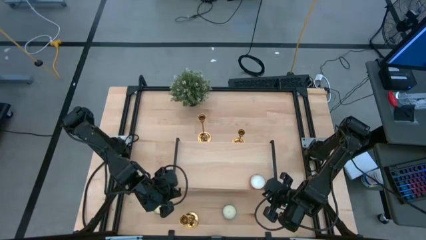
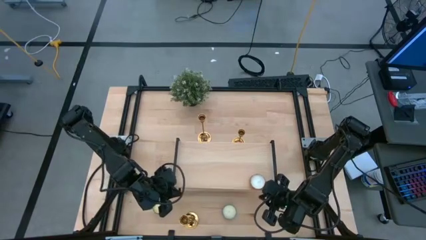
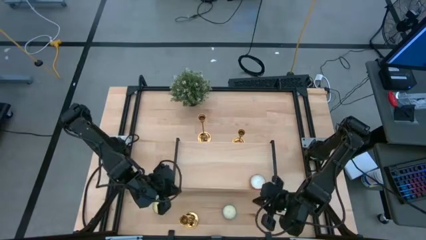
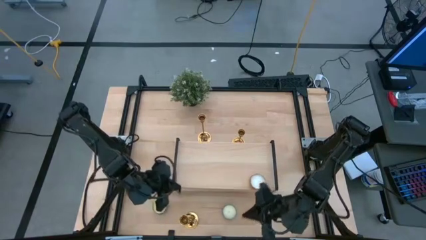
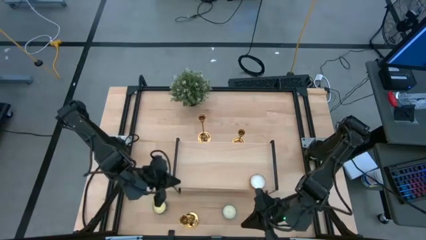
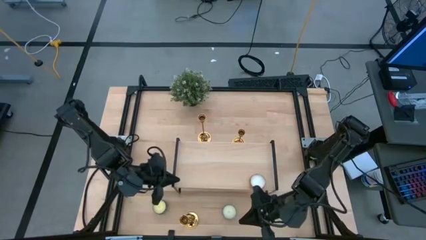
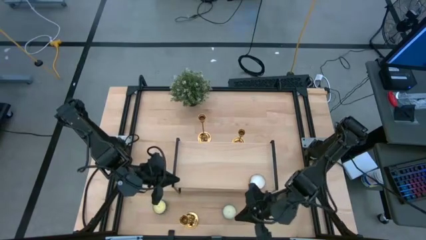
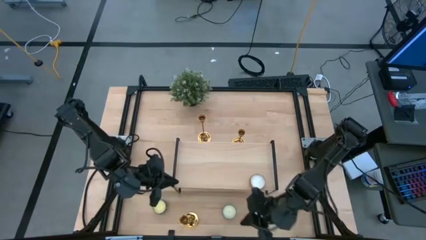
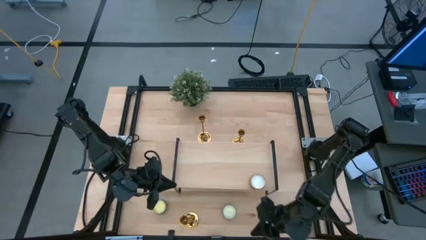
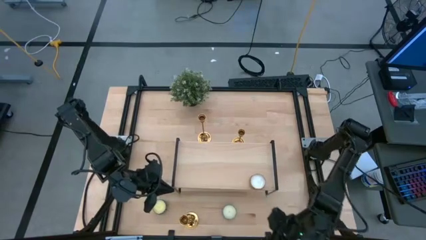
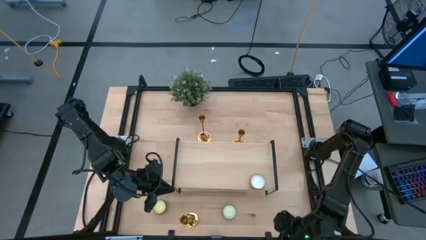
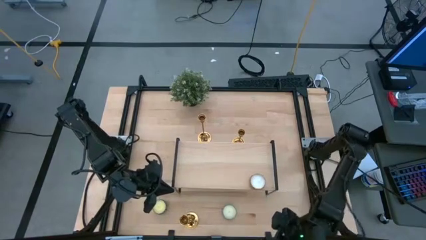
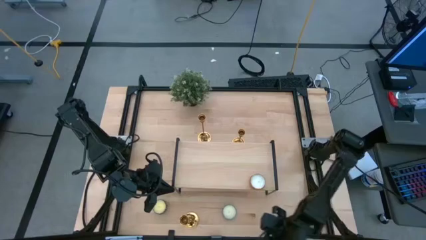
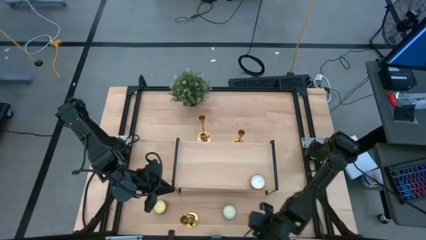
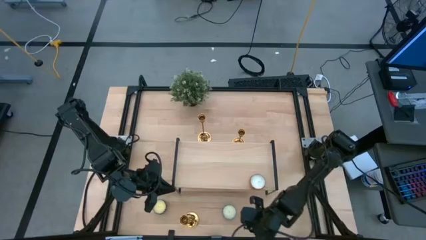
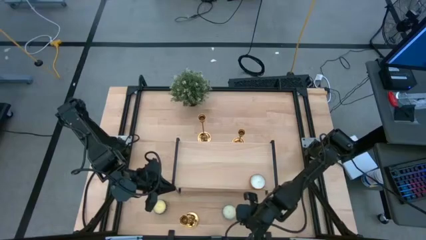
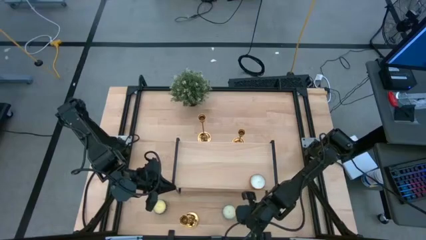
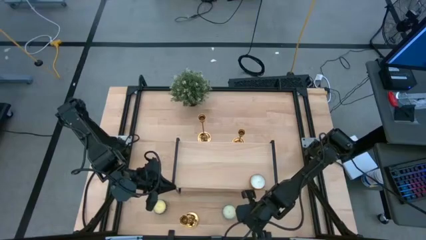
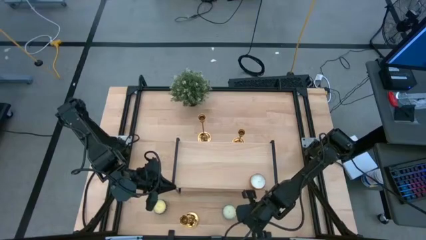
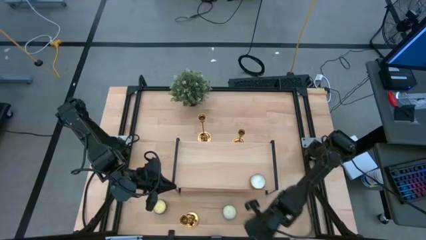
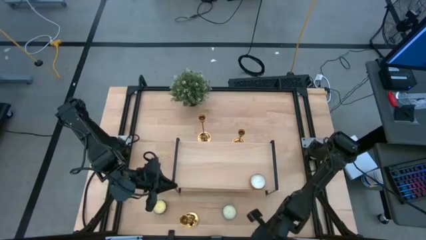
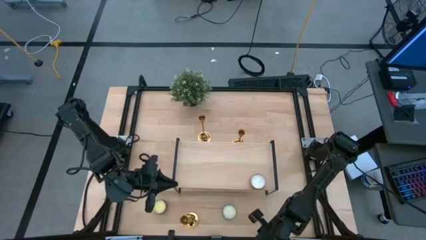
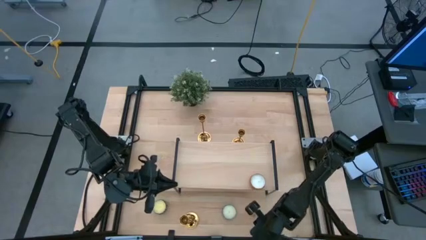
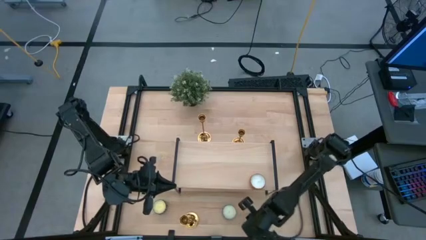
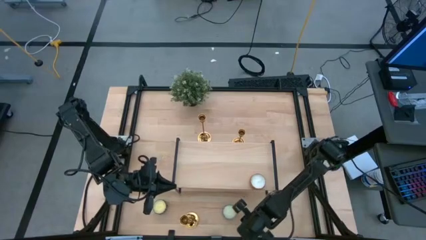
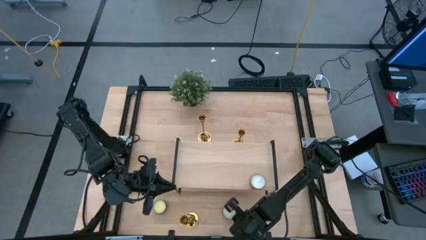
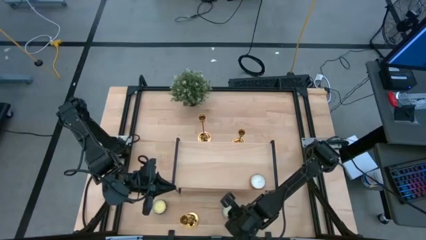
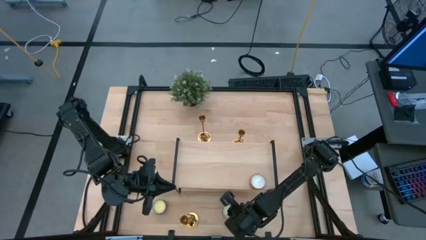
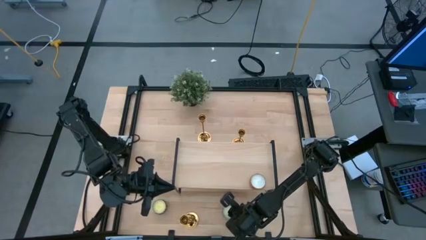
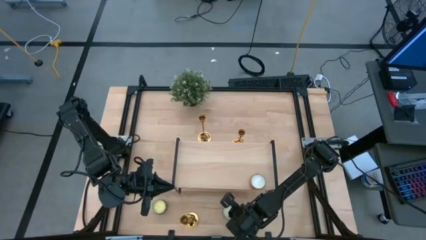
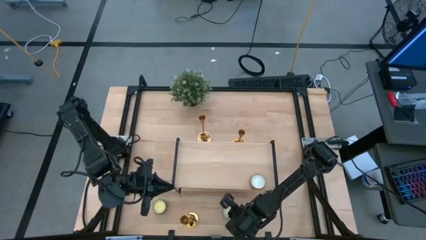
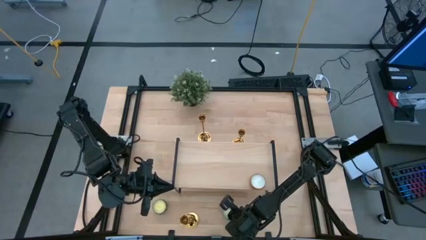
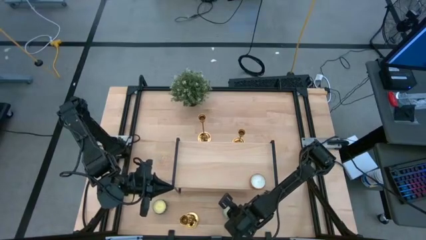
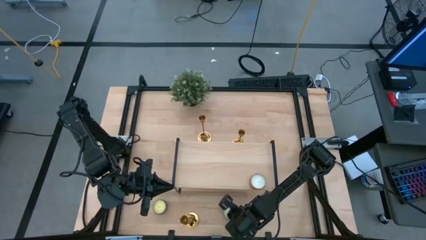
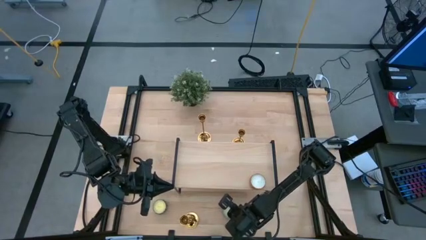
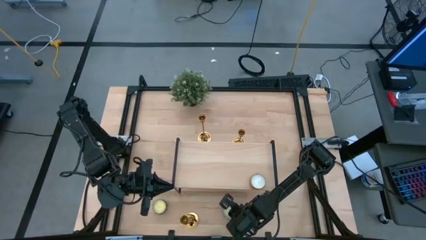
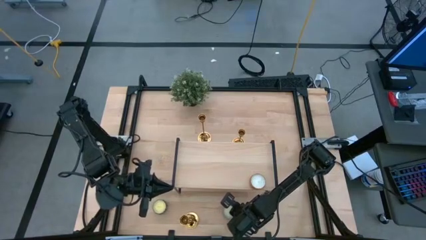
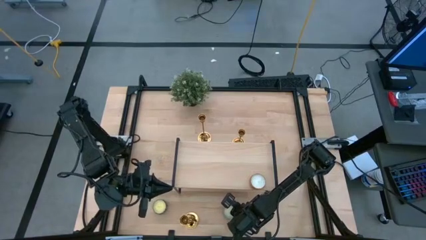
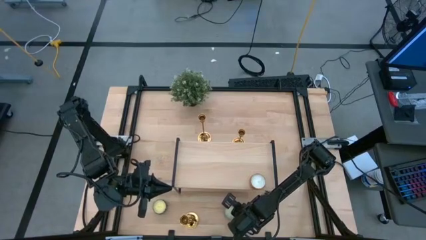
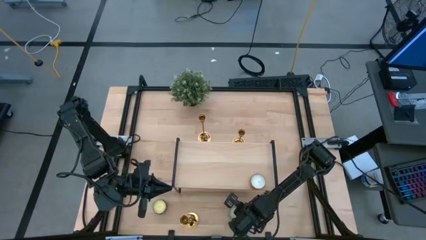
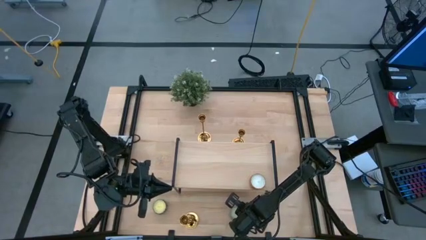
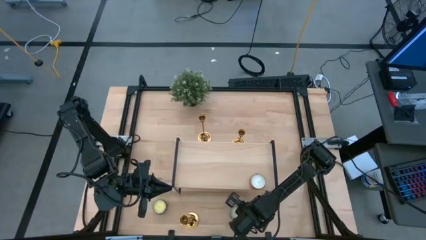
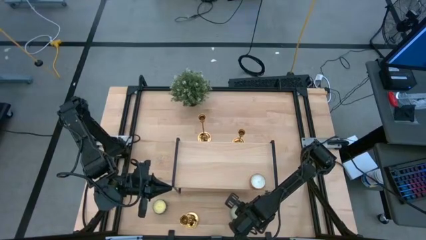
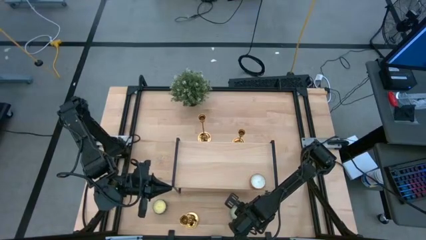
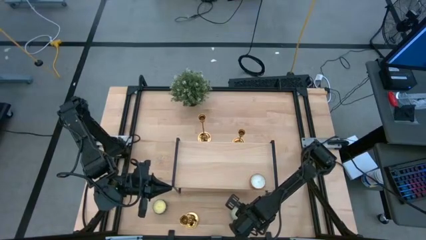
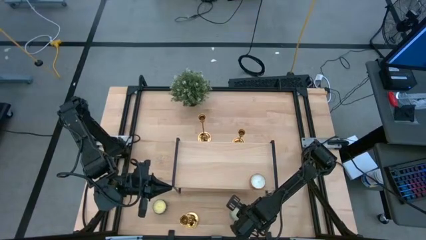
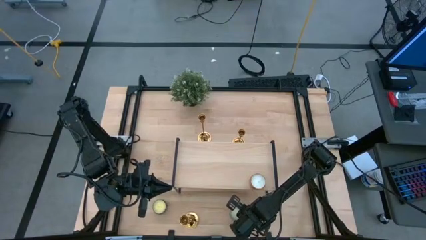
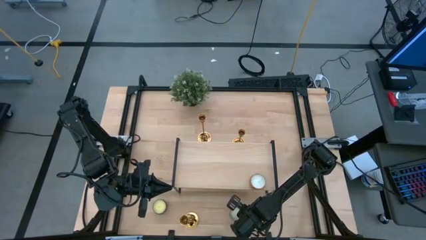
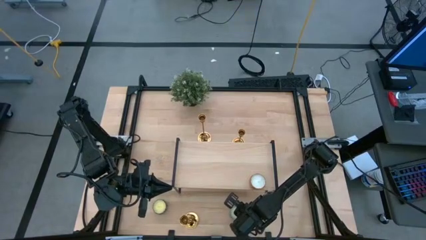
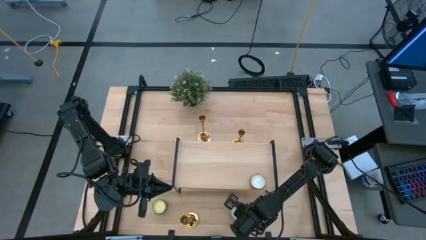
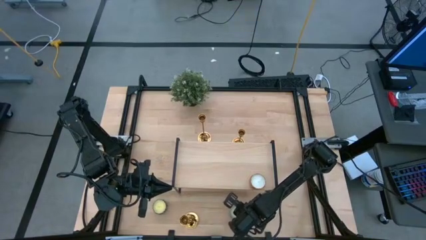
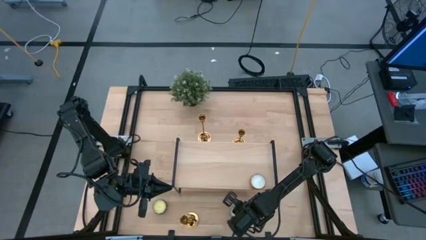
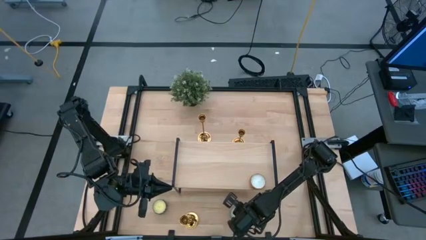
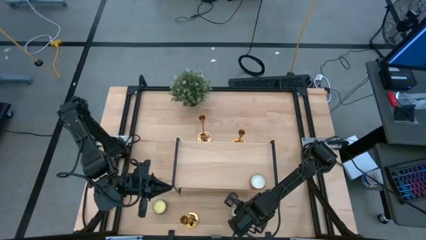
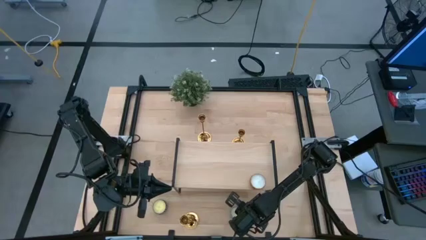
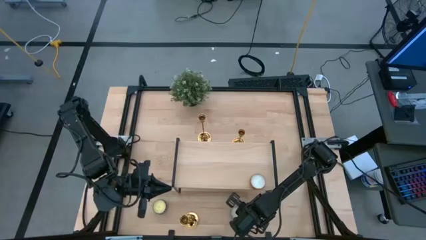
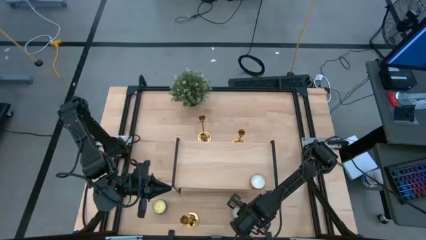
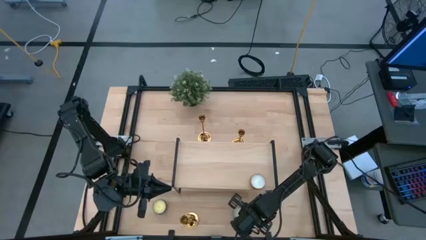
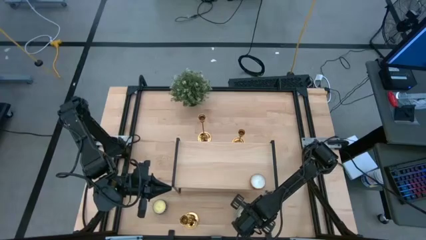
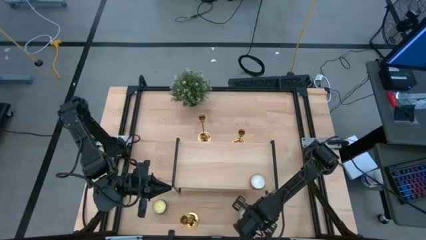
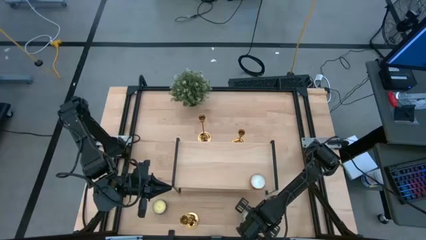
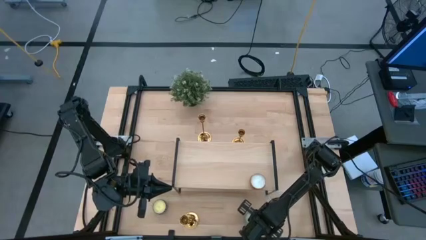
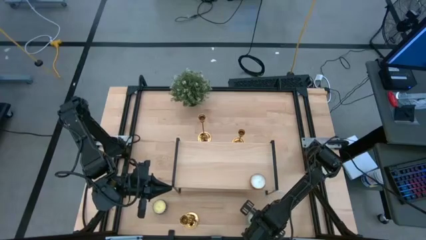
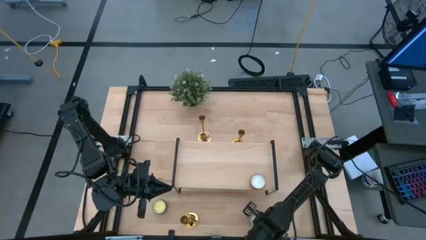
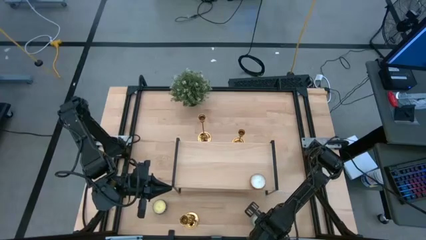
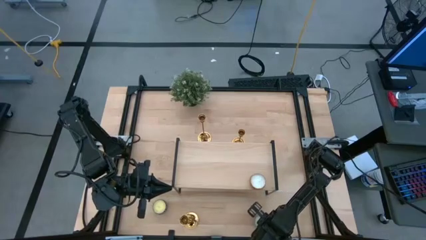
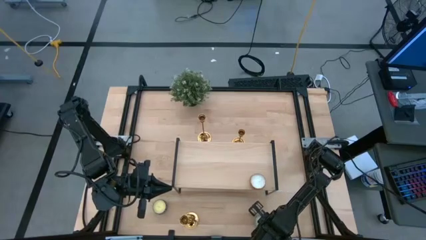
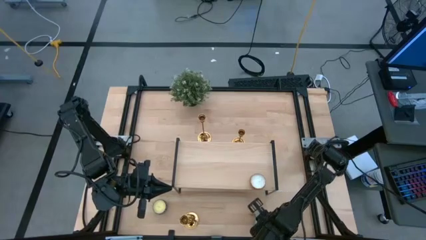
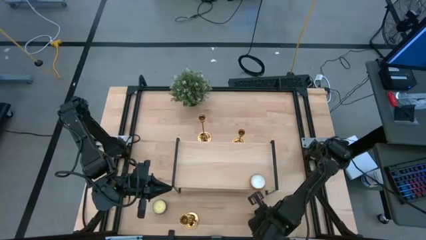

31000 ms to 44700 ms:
Task: Pick & Place candle stick holders
Put the blue scented candle on the shelf aligned with the orange scented candle

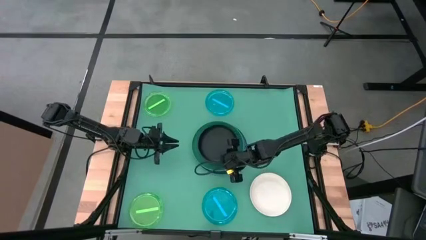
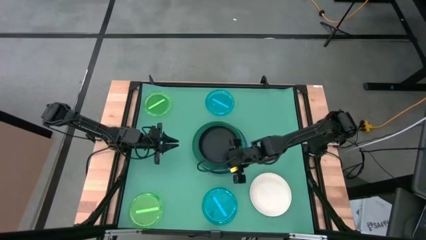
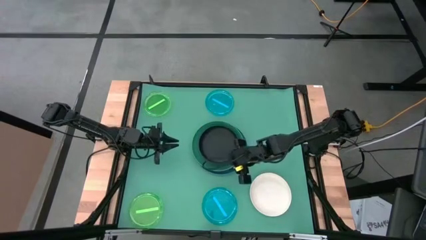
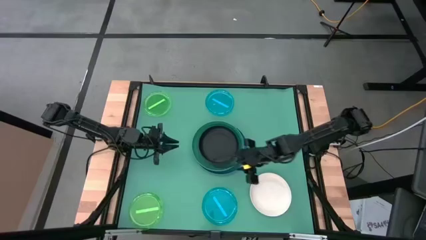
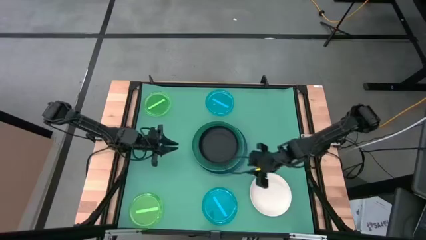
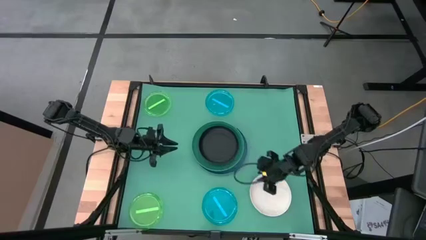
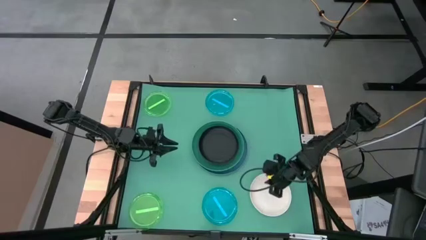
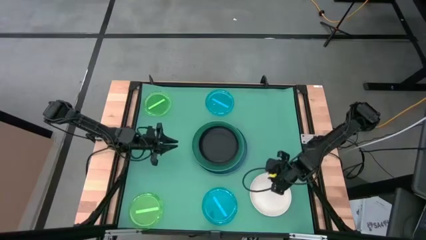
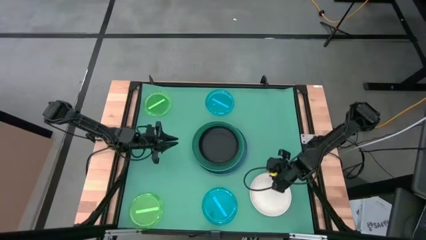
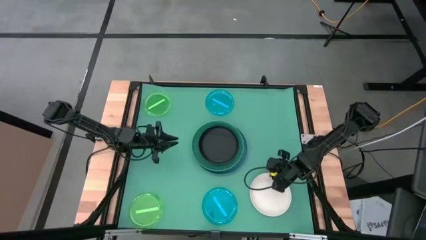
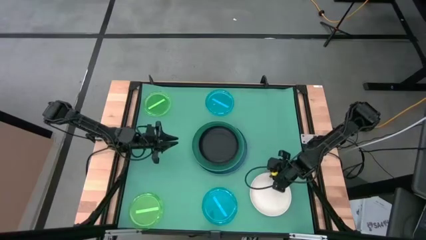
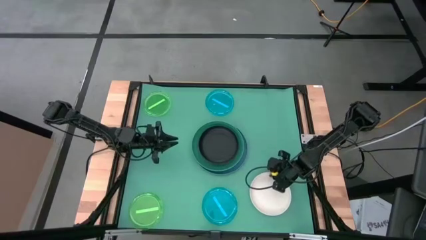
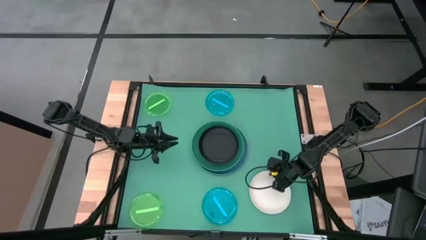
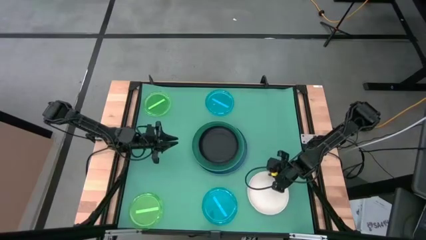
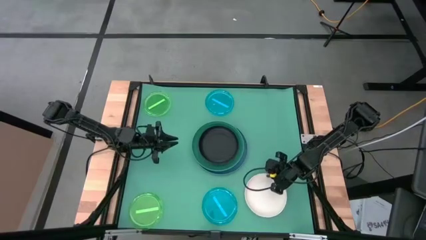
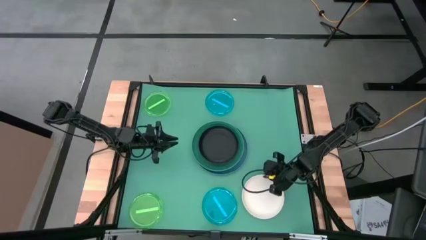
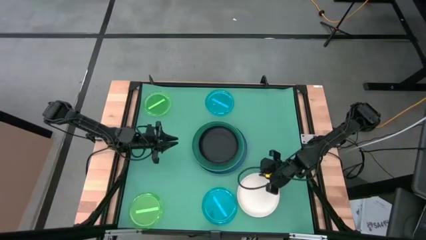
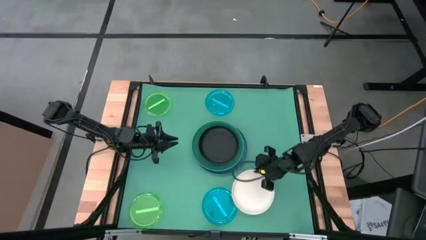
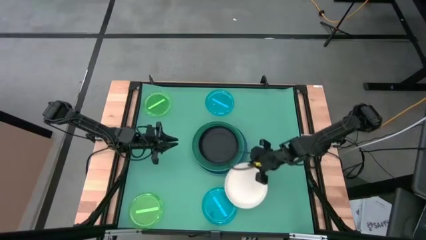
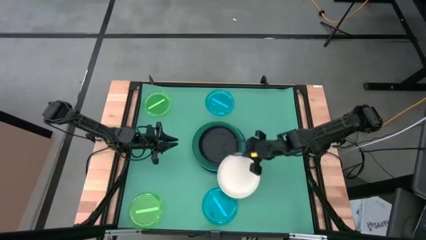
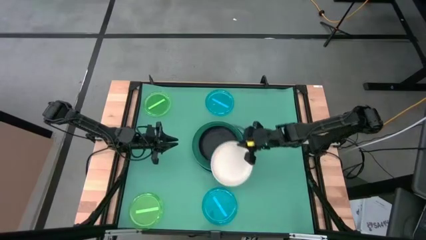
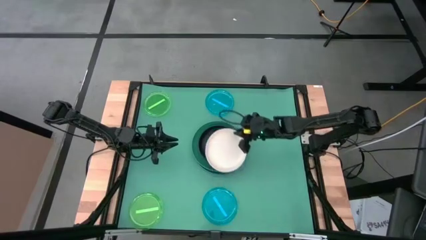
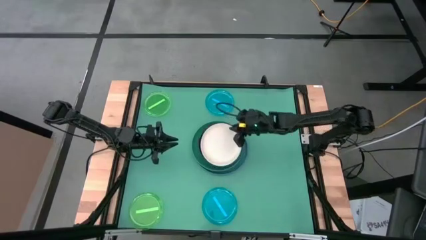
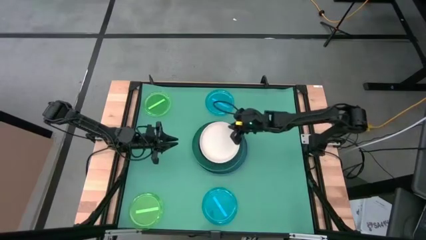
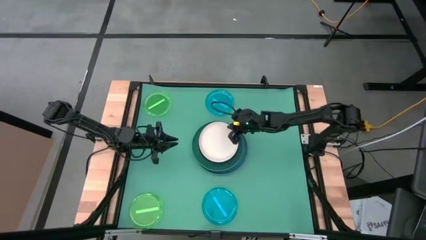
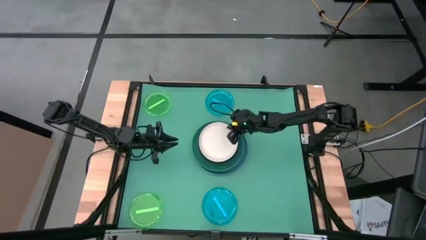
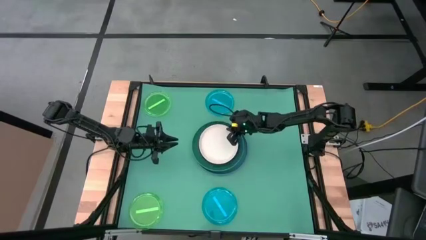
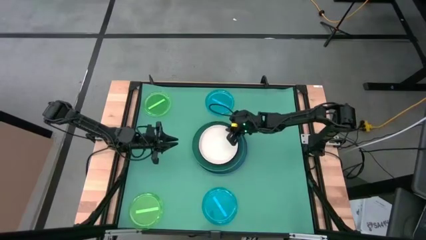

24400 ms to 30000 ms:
Task: Stack plastic plates
Stack the white plate on top of the black plate
